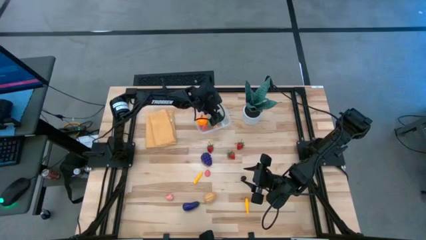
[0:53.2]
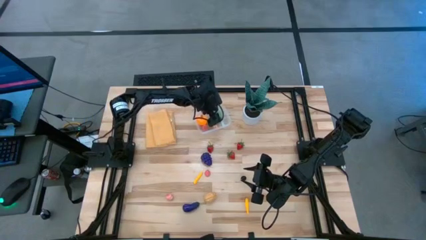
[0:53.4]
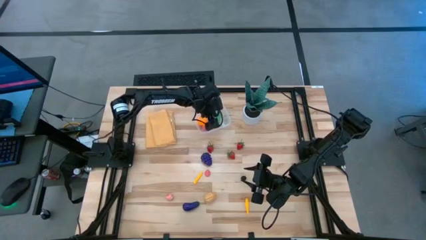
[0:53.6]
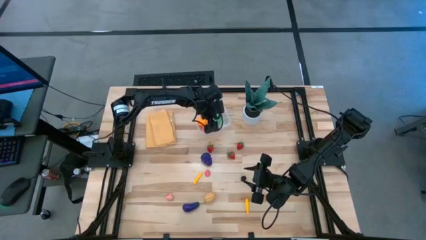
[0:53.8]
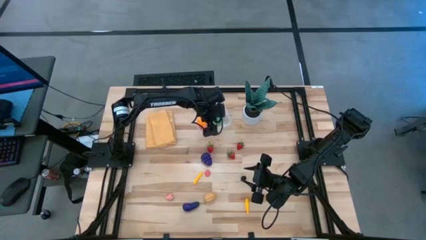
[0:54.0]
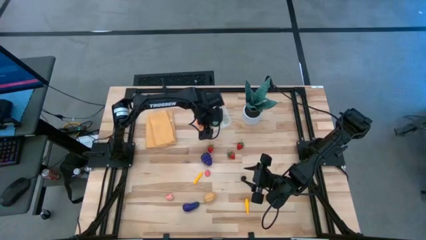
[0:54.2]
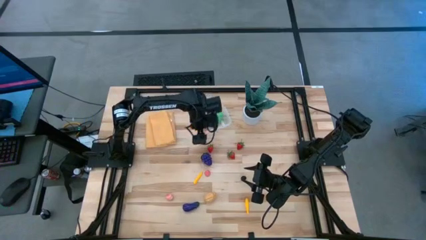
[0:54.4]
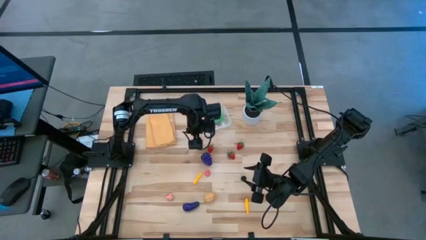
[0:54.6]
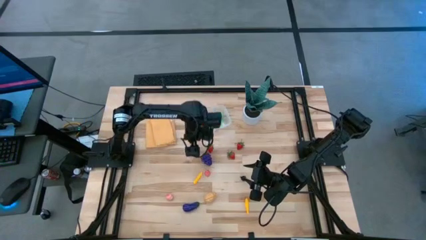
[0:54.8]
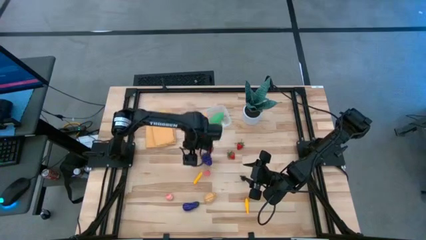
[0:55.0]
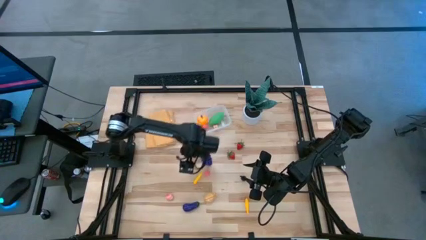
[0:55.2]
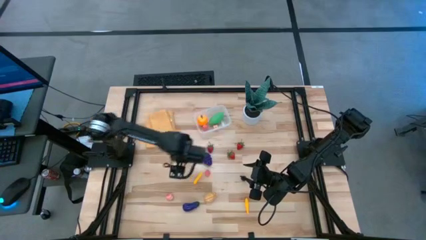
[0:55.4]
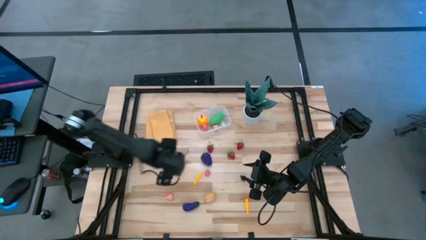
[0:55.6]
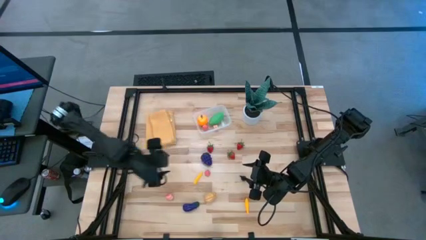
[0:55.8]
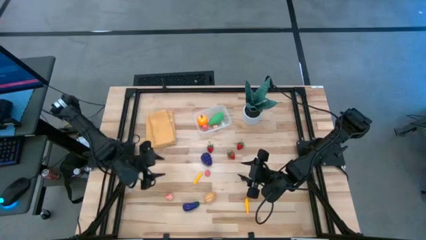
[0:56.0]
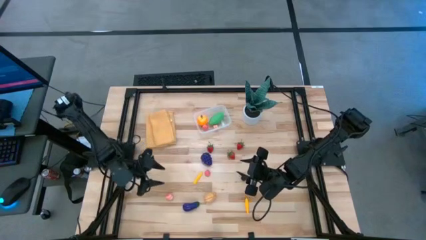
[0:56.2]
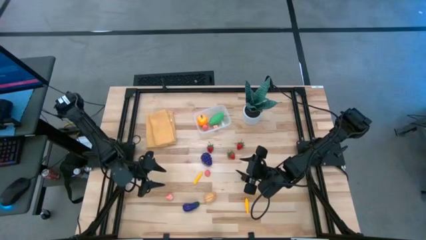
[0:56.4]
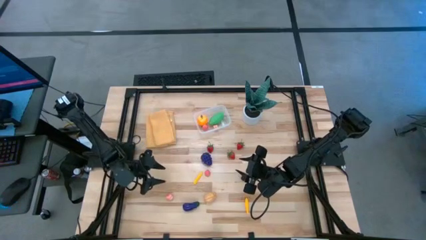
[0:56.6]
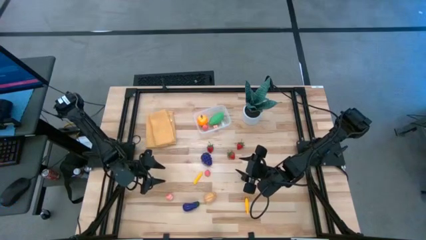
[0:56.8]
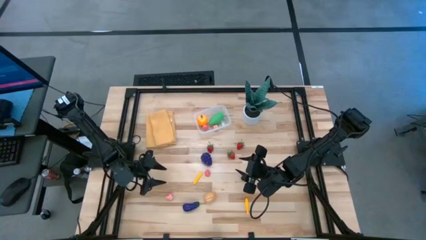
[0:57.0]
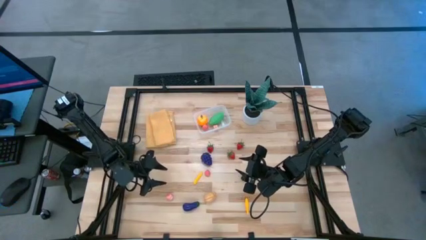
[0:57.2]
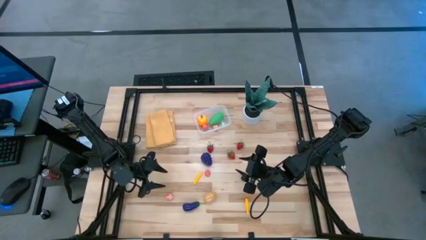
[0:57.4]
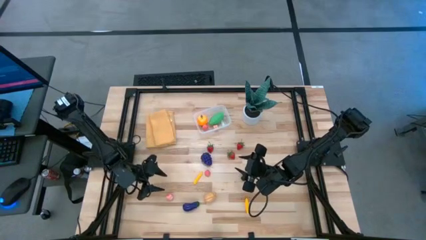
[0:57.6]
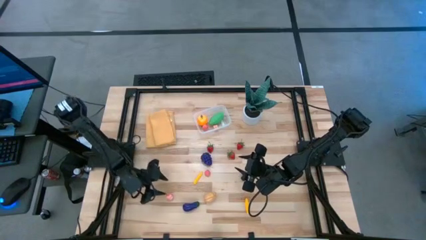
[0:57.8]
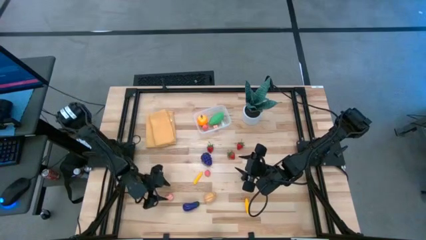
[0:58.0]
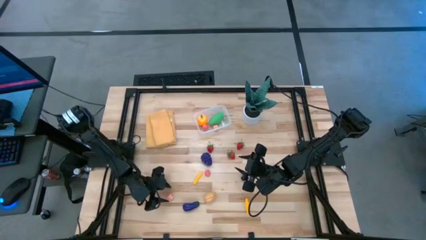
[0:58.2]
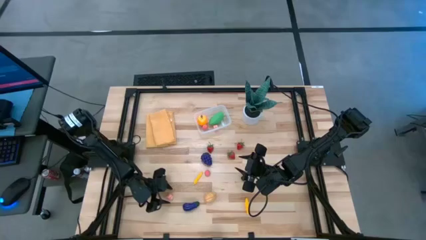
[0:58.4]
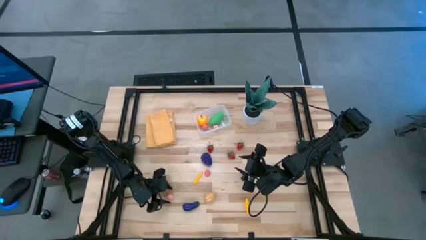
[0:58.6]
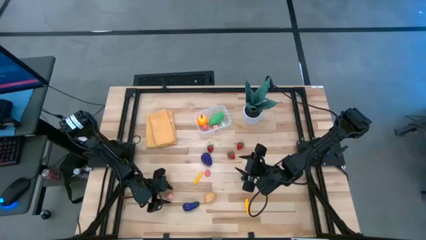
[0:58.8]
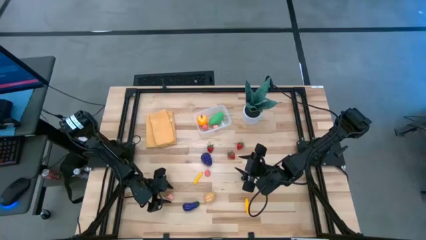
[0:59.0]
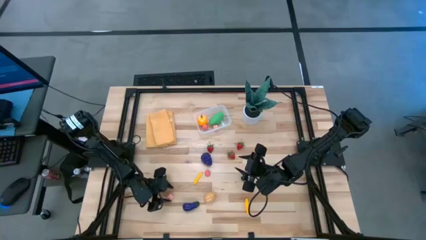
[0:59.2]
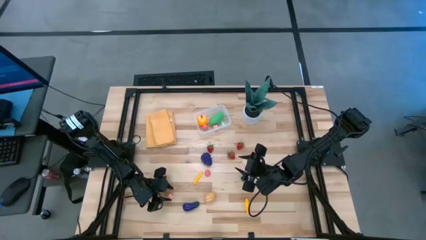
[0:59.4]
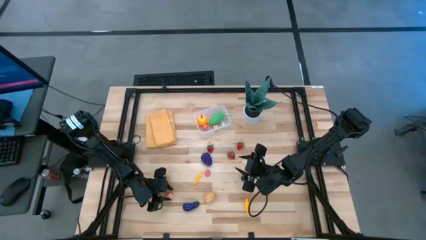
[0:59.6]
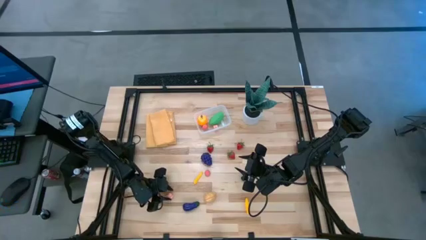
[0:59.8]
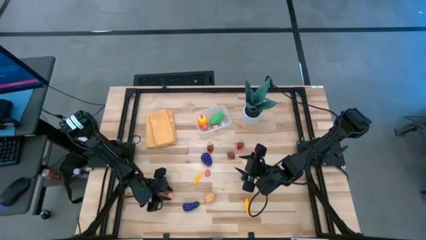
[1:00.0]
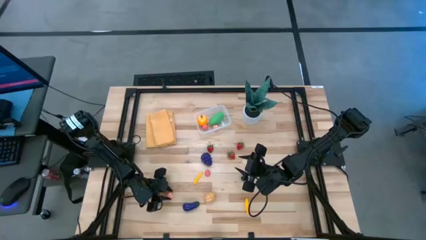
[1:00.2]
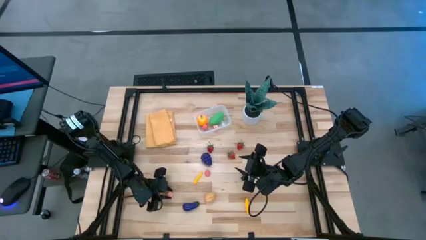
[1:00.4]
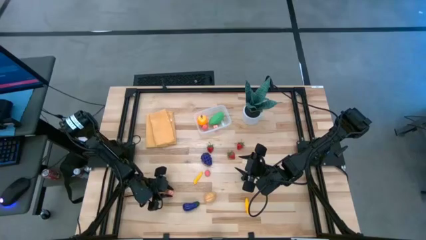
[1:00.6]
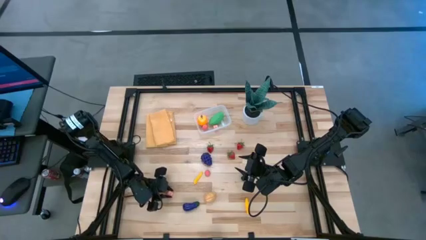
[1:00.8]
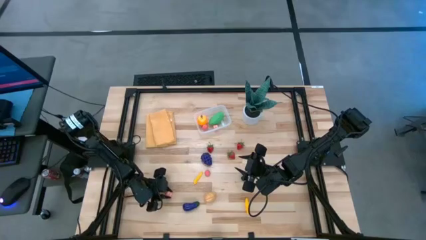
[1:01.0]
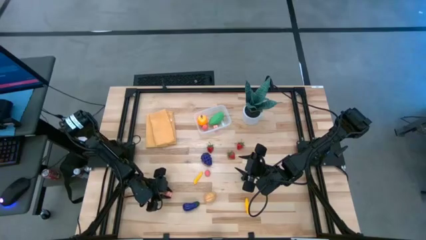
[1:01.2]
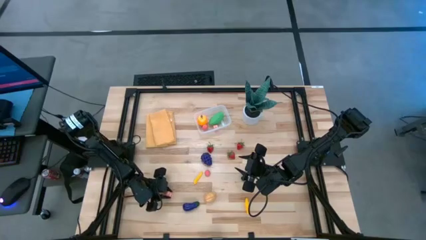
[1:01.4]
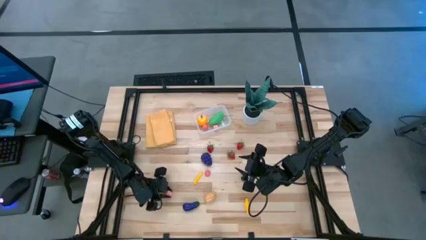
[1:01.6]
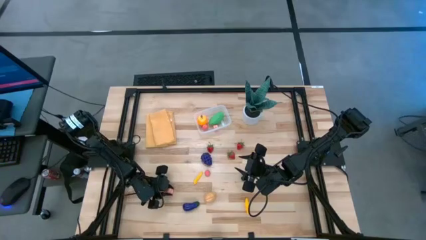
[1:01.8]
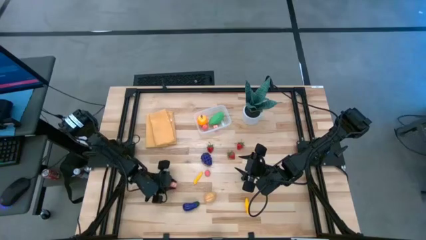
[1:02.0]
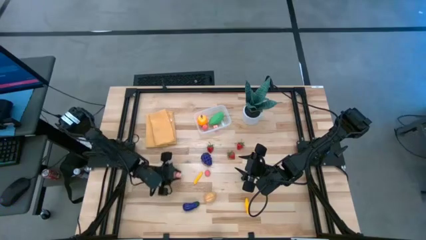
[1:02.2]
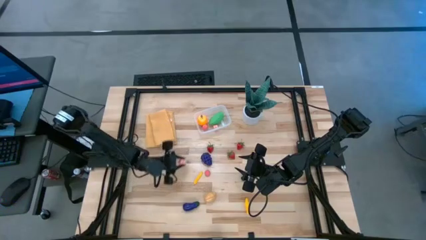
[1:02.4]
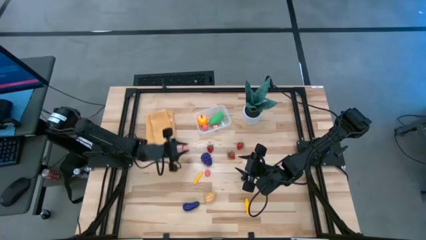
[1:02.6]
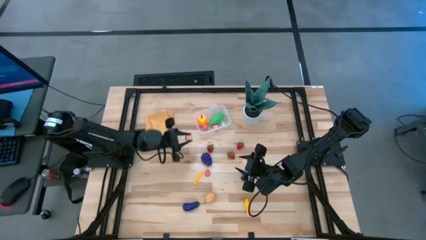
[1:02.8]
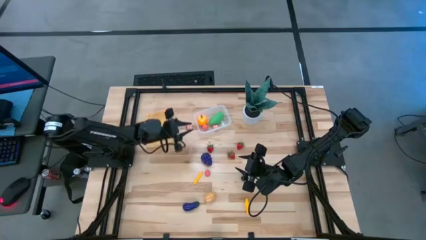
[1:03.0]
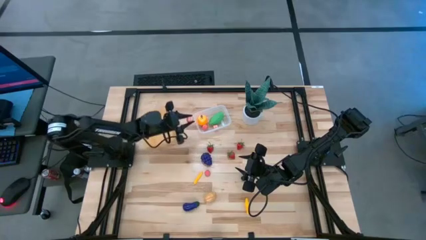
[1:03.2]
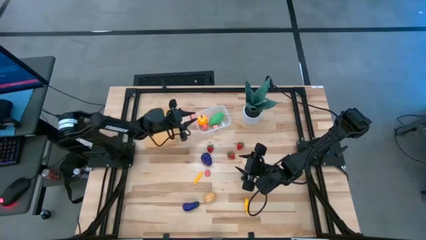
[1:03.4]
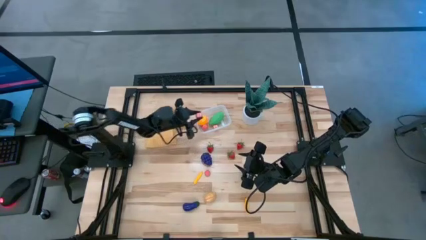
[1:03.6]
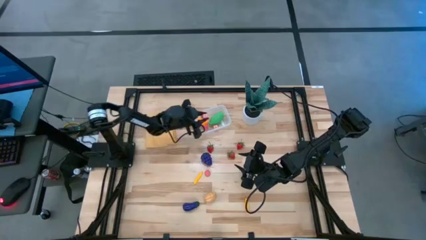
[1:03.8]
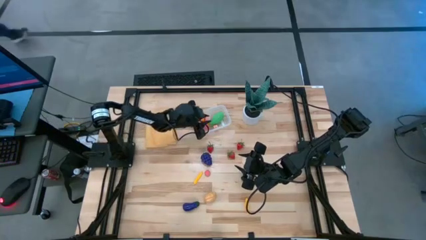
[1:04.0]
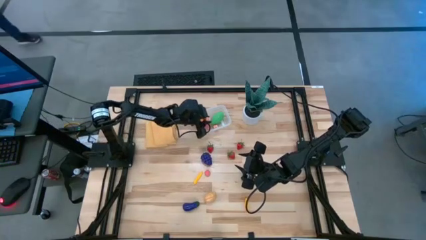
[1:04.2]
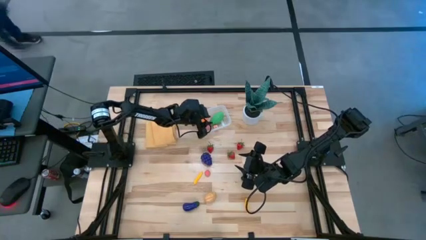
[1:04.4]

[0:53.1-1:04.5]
Task: Pick and placing Produce into tupperware
Put the pink peach into the transparent bin

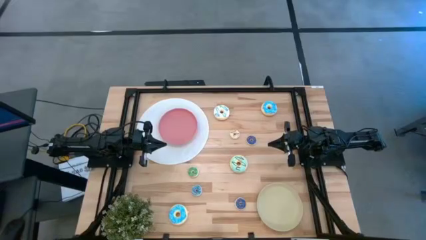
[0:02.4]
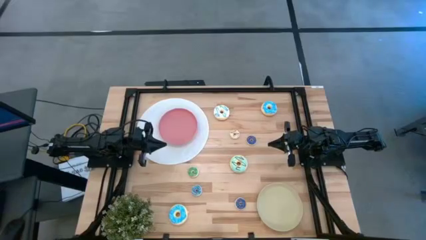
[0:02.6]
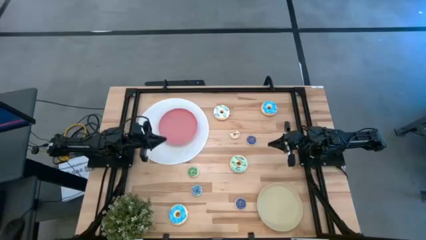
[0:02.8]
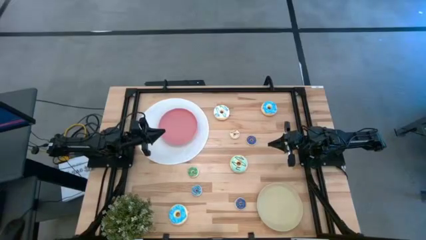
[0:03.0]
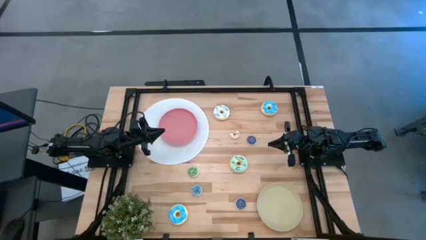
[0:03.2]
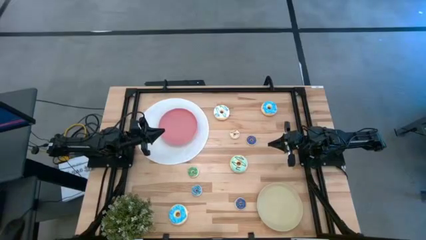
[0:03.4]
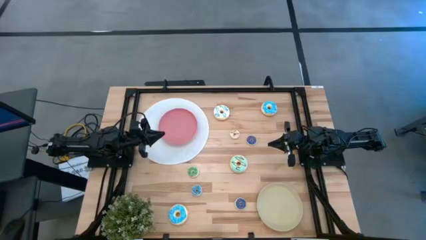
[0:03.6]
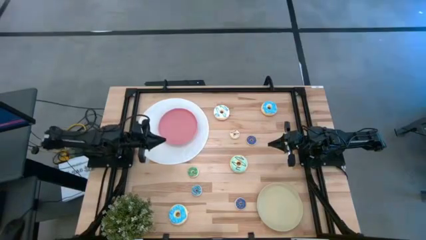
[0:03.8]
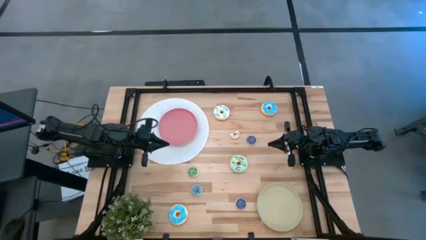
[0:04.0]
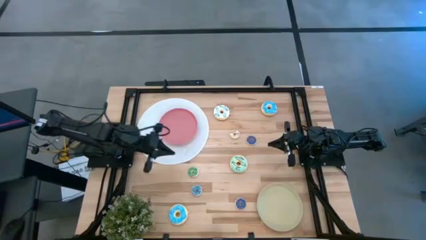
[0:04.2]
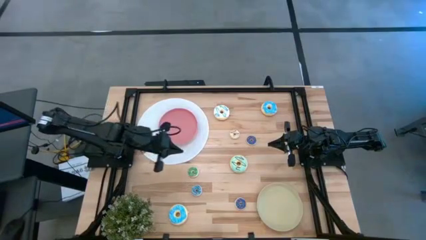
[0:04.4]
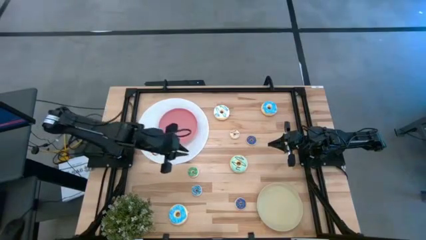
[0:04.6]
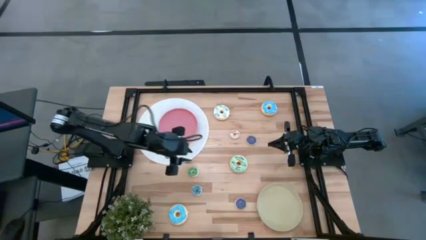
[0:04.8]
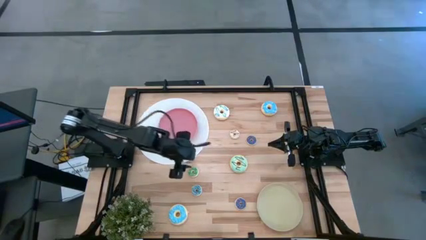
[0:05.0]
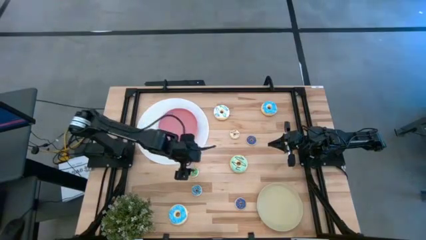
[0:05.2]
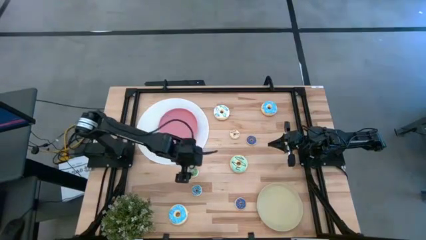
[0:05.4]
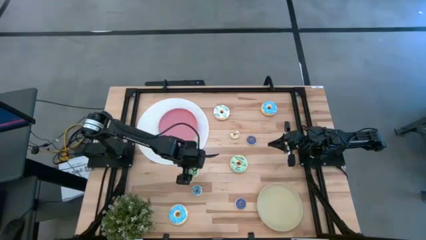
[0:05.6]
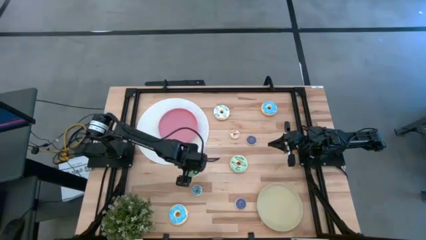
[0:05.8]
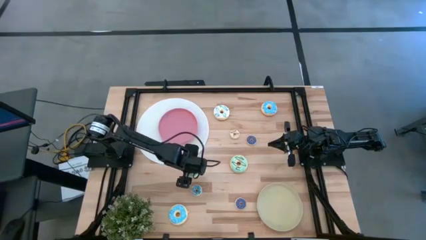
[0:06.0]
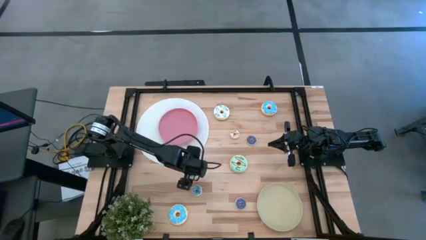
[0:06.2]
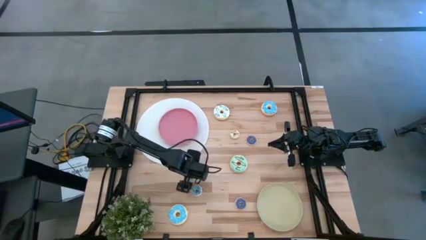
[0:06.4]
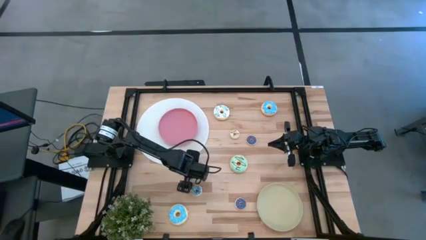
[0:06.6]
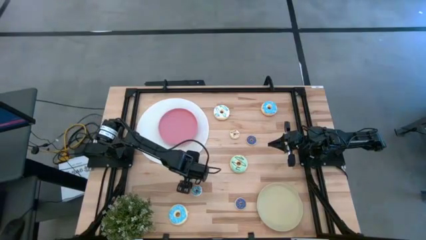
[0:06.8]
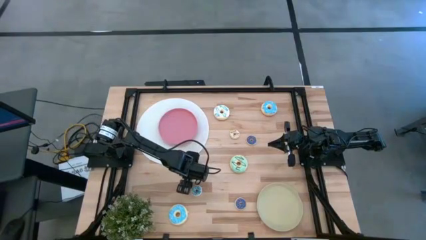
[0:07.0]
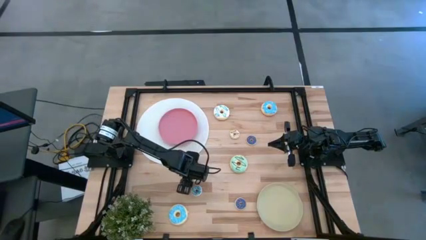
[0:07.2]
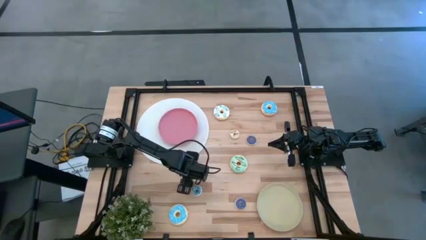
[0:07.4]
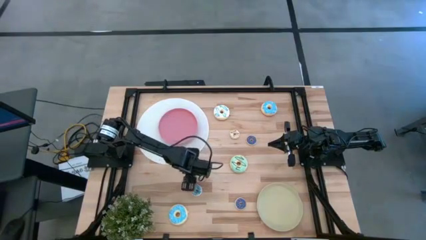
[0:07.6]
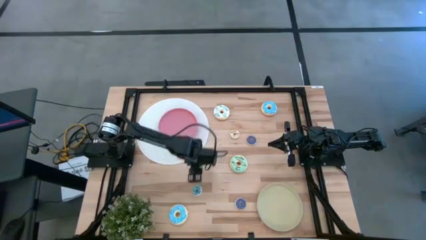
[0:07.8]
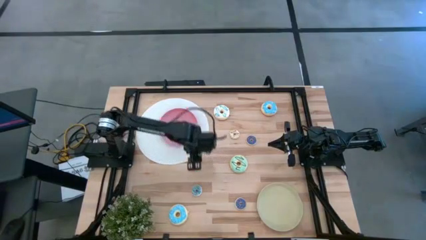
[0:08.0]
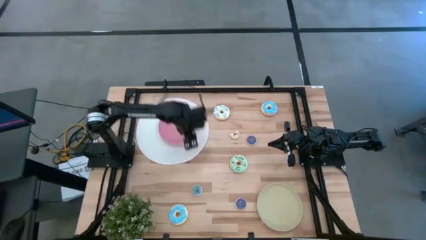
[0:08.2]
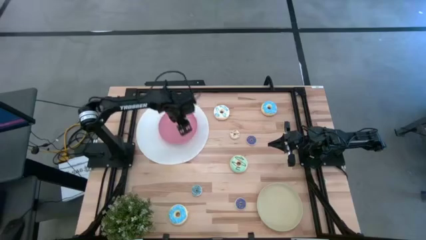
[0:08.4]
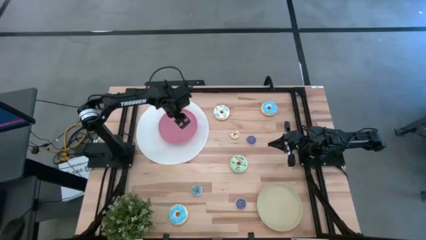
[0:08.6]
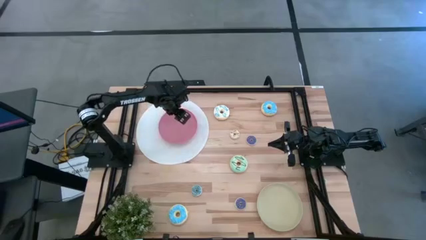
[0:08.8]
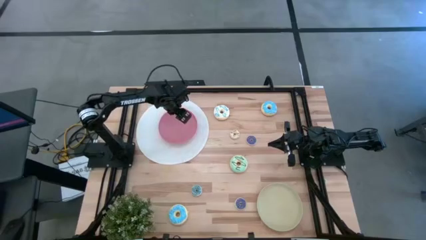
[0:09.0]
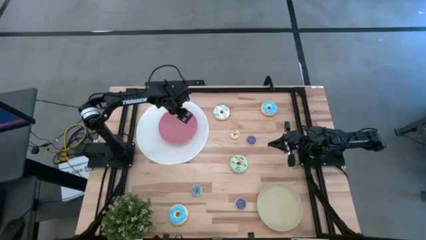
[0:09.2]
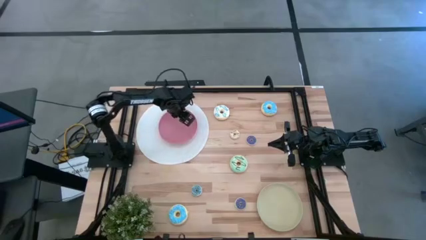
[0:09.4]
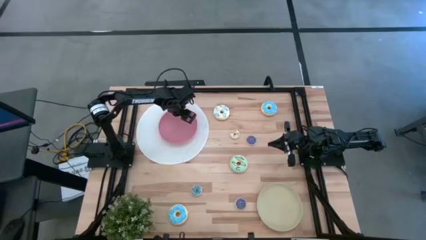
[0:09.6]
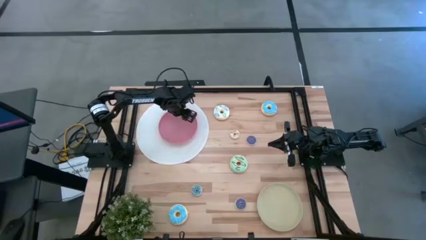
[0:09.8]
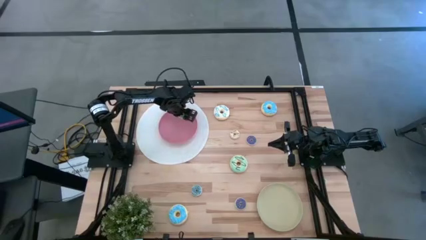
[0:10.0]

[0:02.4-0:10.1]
Task: Pick & Place donuts
Put the small green donut on the pink plate
